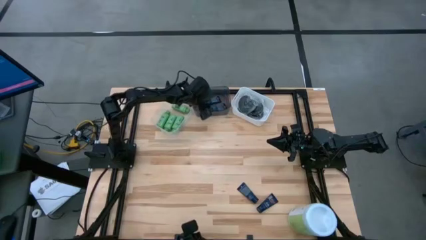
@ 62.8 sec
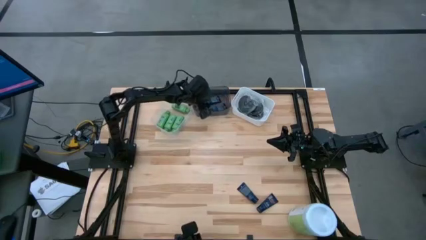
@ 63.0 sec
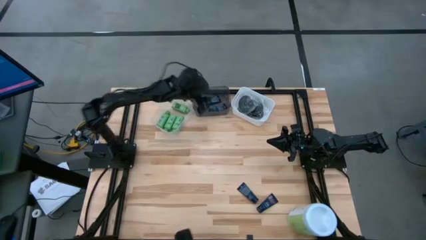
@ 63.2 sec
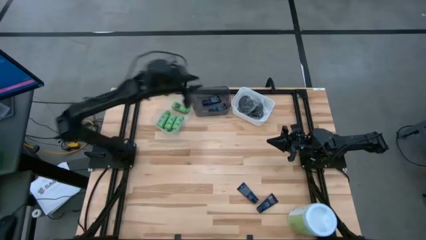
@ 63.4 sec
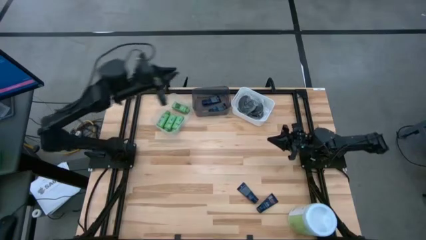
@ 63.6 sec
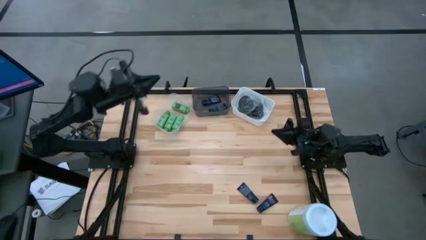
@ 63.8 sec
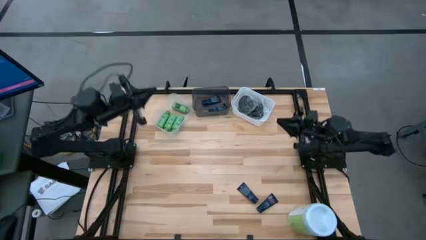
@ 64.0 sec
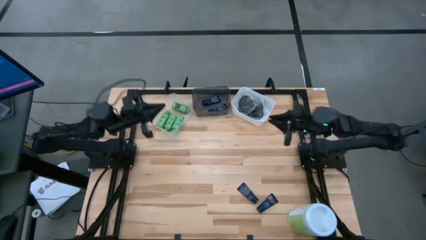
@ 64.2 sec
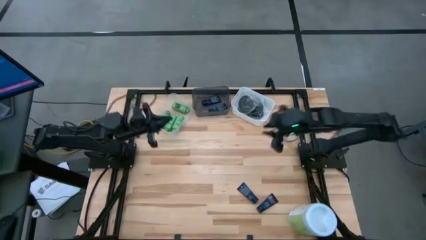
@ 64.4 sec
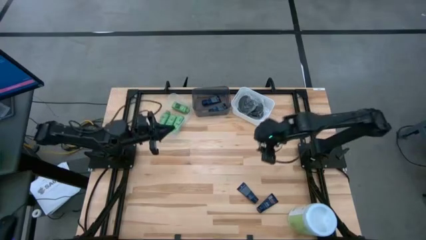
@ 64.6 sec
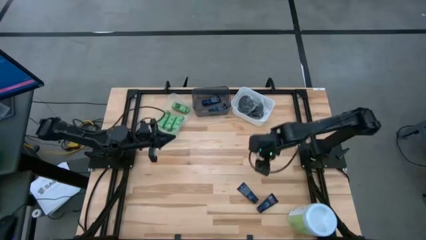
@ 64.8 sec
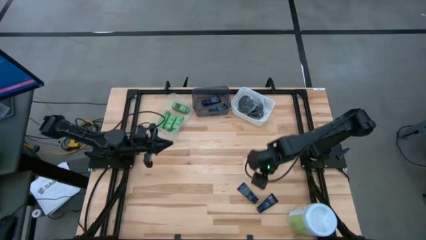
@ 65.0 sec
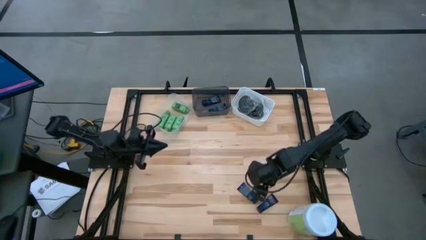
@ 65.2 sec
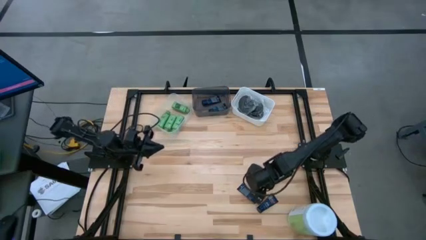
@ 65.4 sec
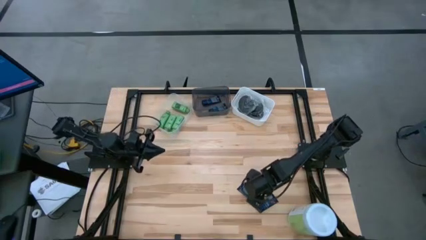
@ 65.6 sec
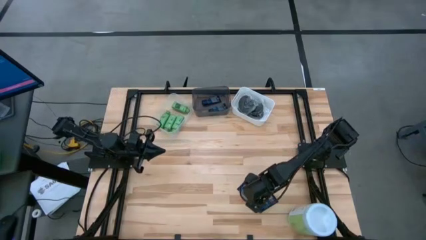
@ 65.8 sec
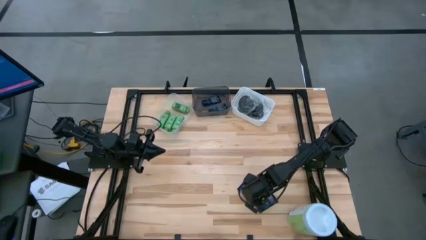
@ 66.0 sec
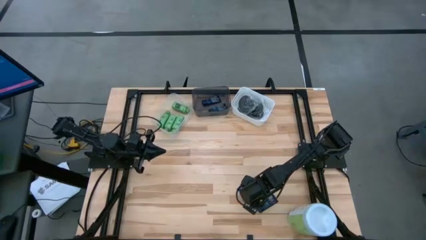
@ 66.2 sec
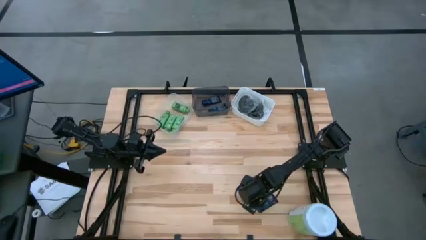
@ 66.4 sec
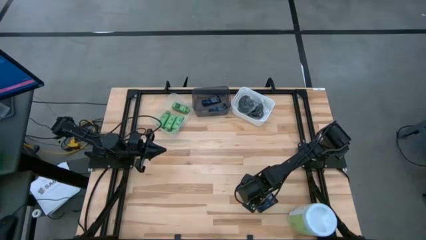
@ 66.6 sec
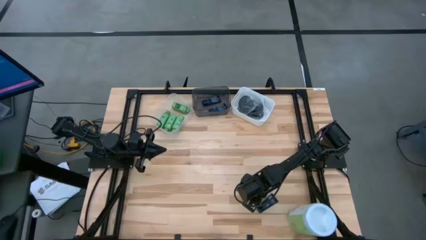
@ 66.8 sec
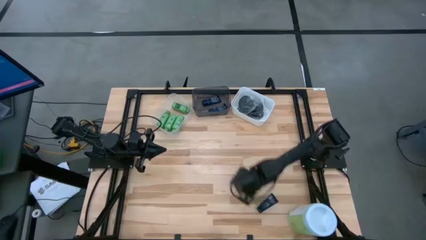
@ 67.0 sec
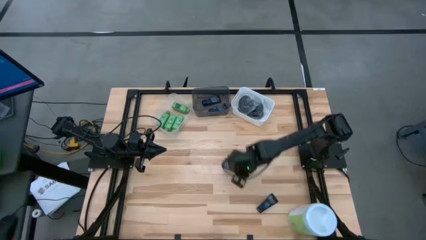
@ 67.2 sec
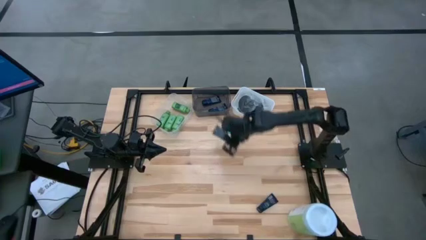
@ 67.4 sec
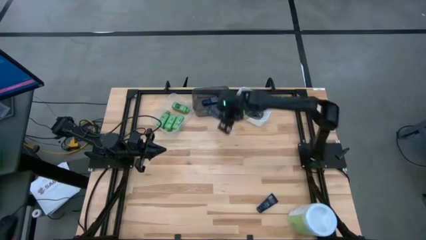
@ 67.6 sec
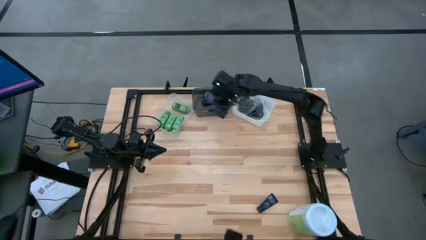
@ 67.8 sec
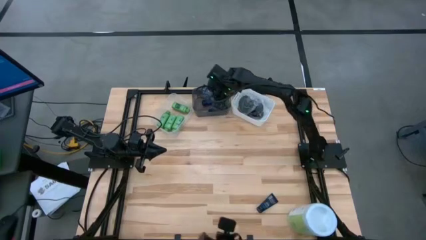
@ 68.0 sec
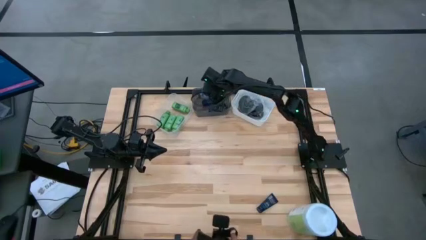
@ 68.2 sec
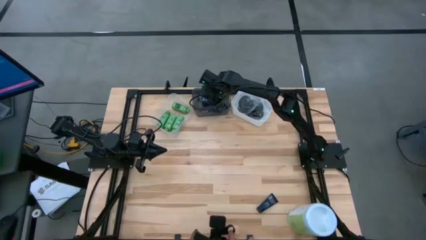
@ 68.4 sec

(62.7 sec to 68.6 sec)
Task: Pick & Place Travel size toiletries
Put the blue shave cream into the black bin

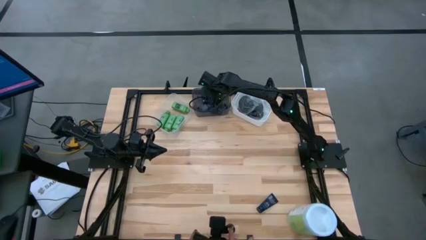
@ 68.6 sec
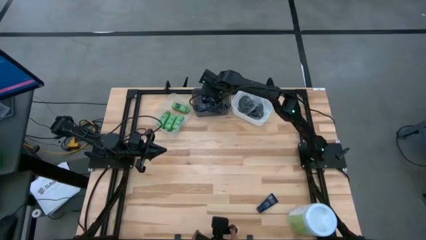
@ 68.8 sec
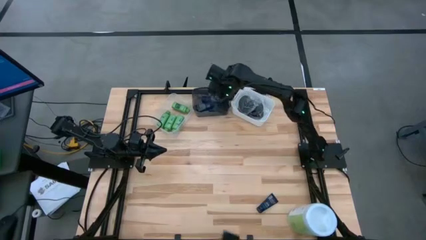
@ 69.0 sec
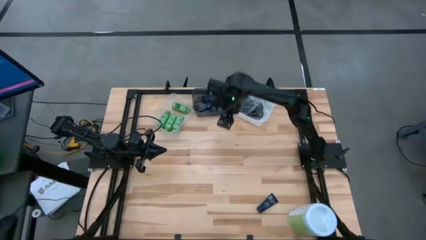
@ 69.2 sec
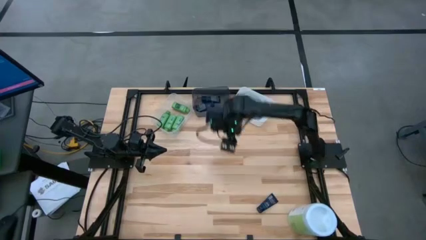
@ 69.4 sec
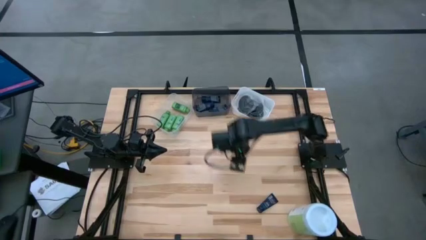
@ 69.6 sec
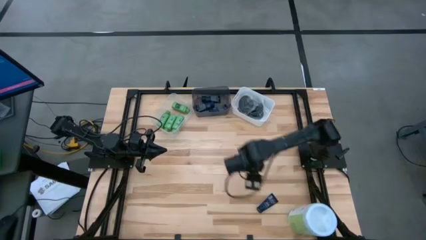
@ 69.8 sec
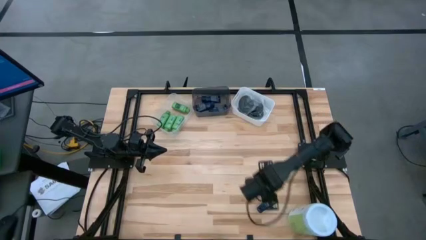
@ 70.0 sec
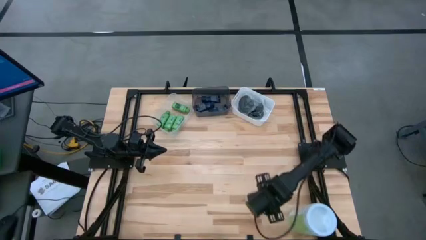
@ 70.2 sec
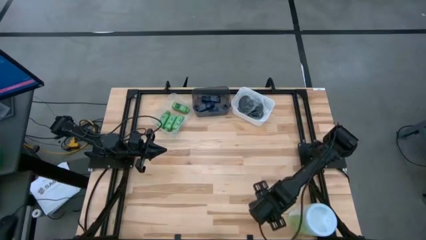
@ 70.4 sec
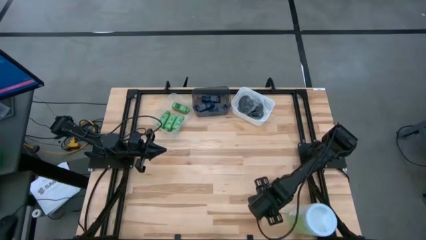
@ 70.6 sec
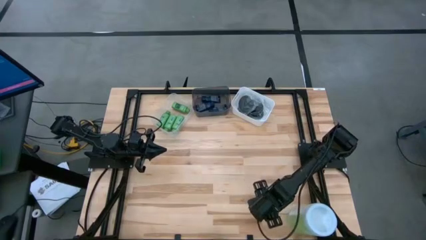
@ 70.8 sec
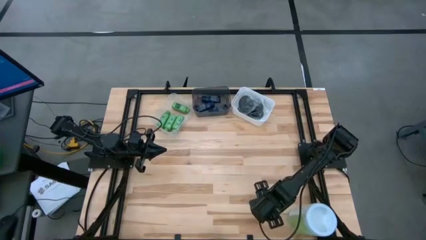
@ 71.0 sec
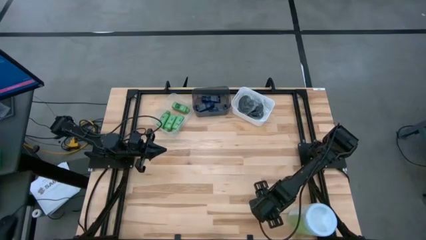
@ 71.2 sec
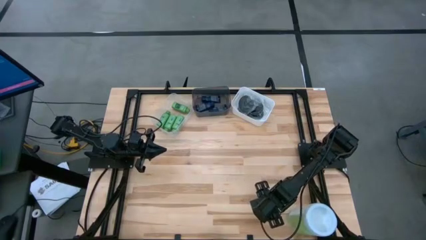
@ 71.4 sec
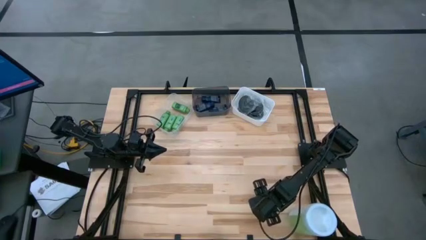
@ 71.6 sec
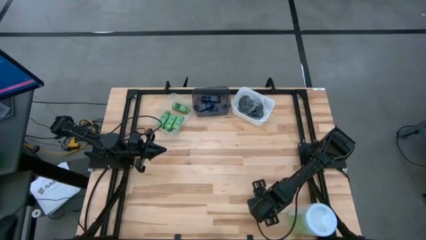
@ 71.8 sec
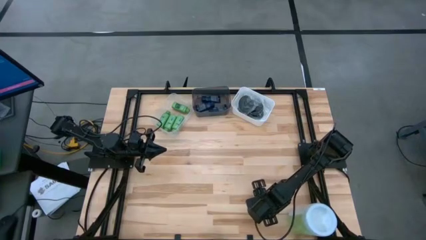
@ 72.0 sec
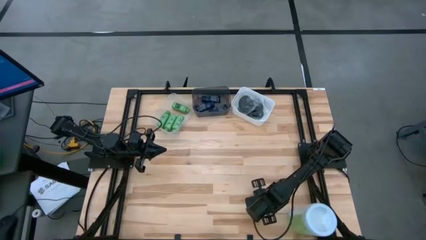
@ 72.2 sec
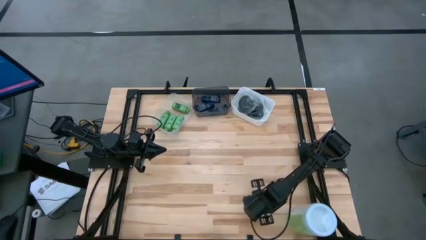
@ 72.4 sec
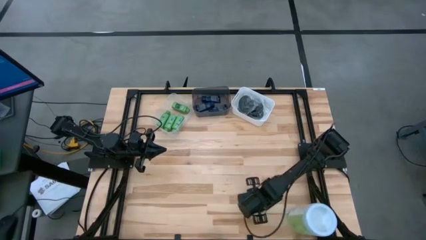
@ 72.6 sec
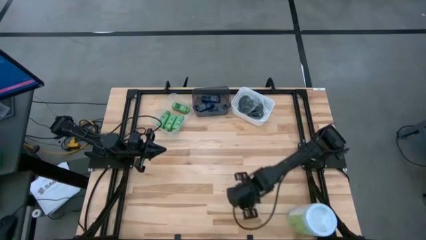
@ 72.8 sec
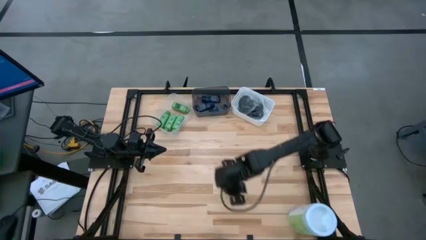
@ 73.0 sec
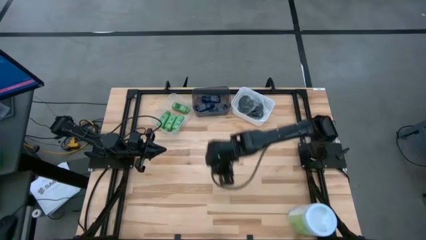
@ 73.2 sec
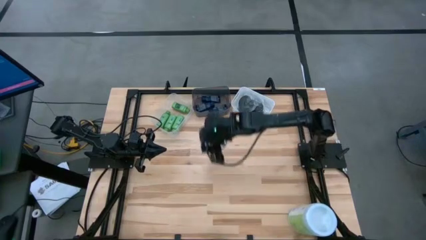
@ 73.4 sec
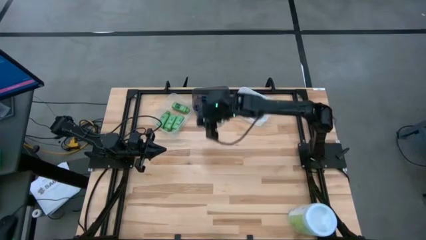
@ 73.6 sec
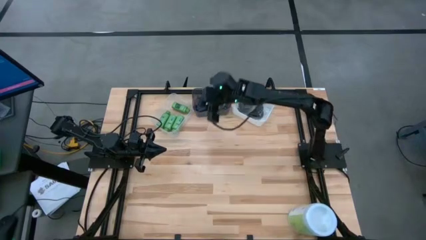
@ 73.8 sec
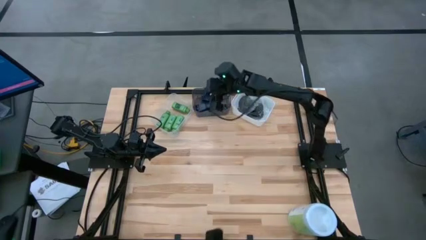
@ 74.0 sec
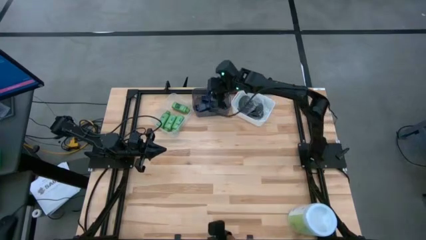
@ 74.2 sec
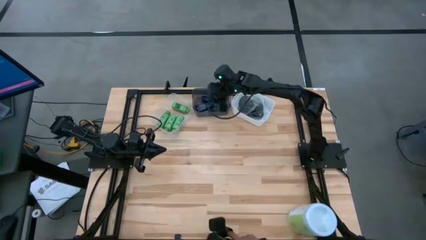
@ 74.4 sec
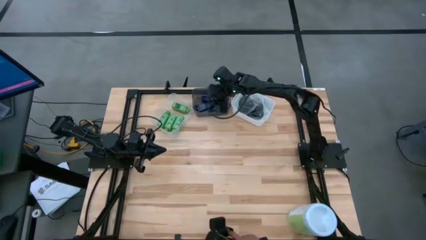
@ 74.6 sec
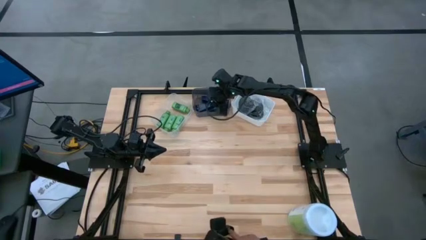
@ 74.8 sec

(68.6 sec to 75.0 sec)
Put the blue shave cream into the black bin

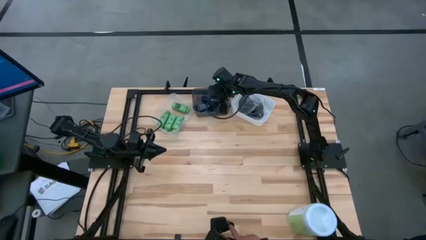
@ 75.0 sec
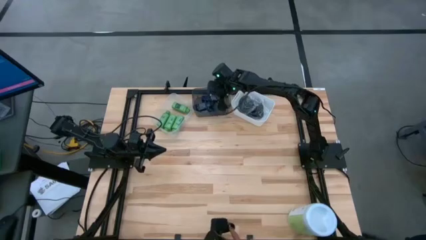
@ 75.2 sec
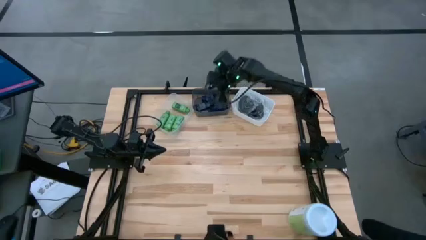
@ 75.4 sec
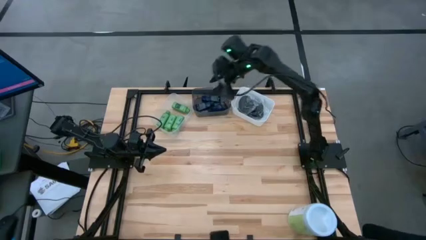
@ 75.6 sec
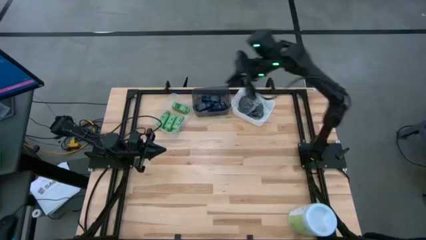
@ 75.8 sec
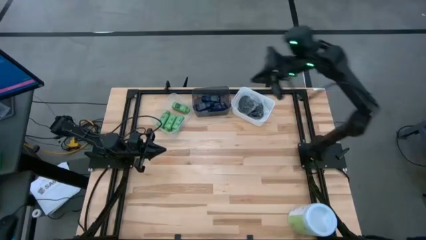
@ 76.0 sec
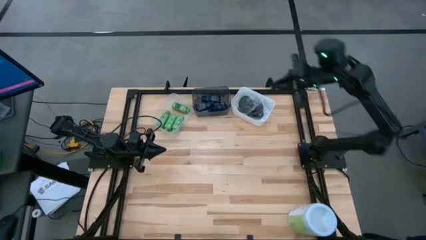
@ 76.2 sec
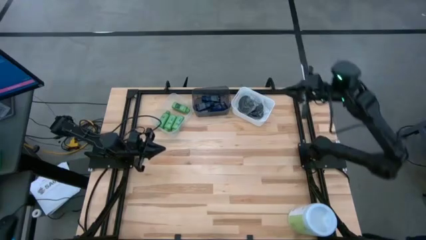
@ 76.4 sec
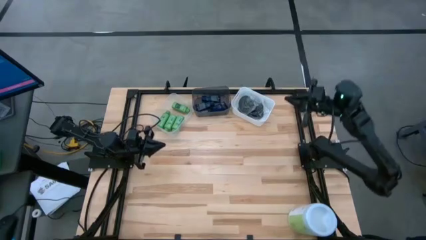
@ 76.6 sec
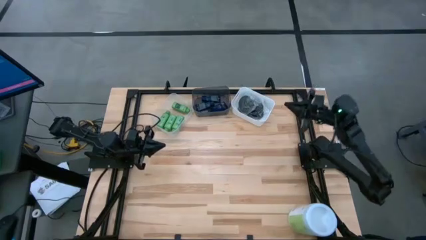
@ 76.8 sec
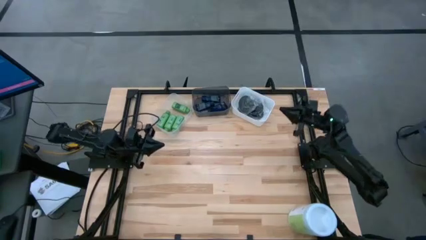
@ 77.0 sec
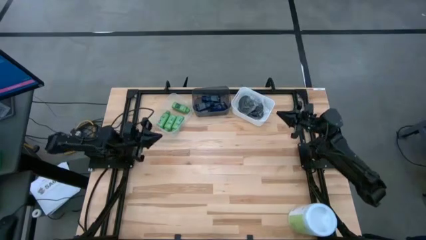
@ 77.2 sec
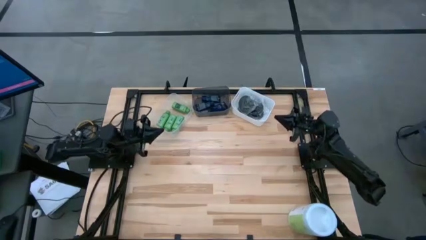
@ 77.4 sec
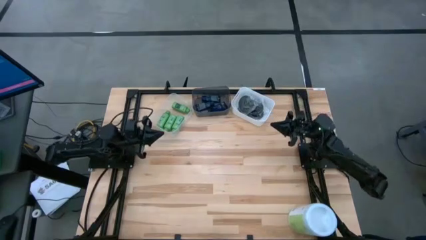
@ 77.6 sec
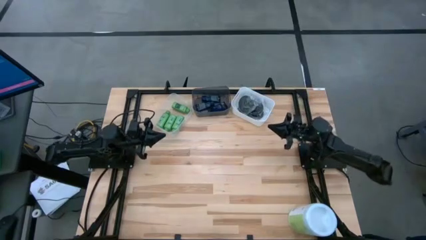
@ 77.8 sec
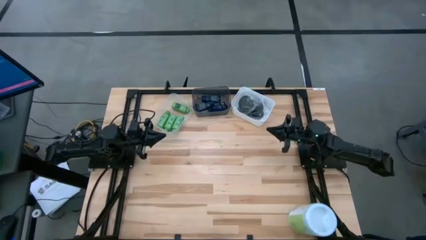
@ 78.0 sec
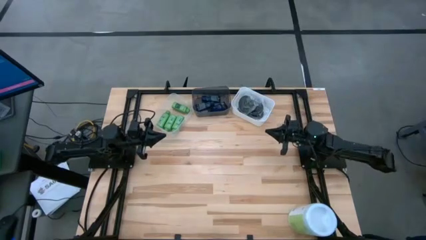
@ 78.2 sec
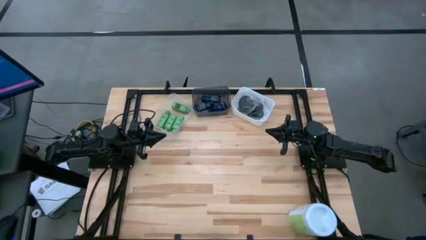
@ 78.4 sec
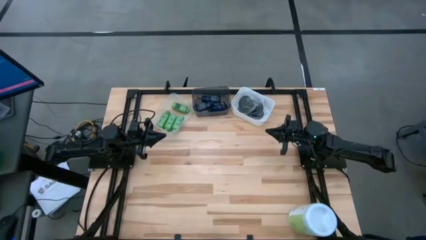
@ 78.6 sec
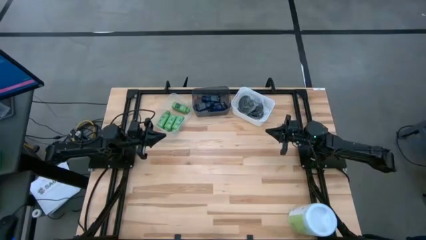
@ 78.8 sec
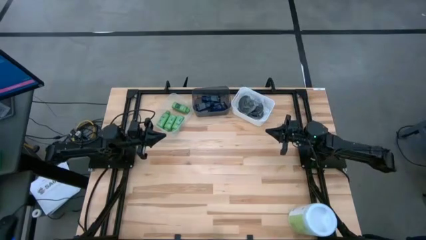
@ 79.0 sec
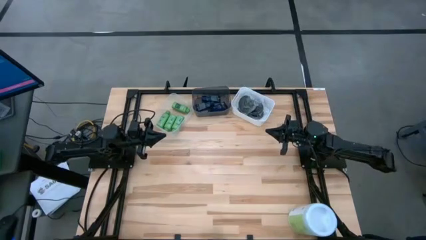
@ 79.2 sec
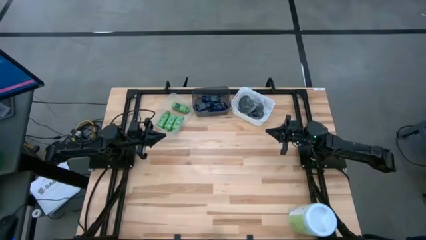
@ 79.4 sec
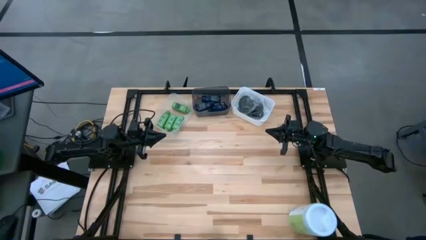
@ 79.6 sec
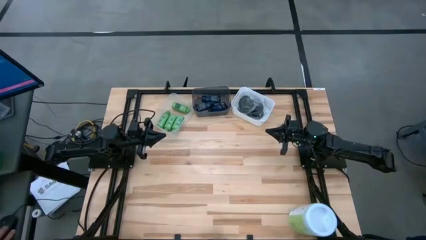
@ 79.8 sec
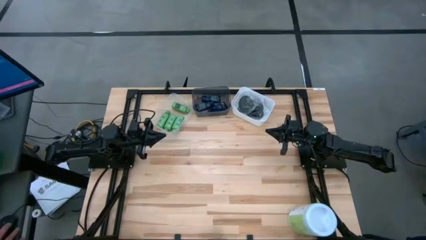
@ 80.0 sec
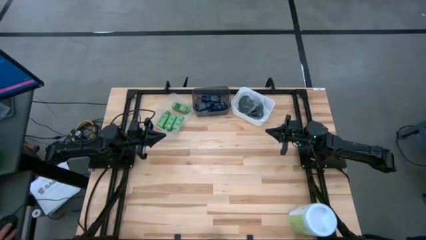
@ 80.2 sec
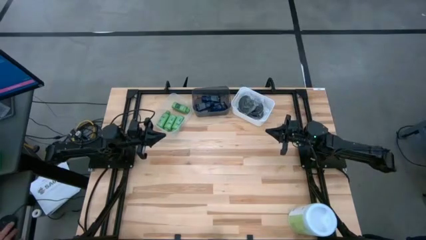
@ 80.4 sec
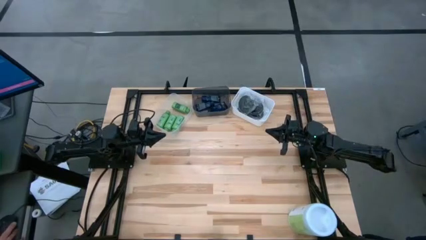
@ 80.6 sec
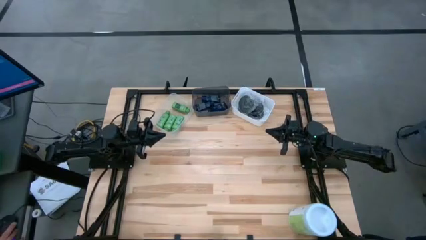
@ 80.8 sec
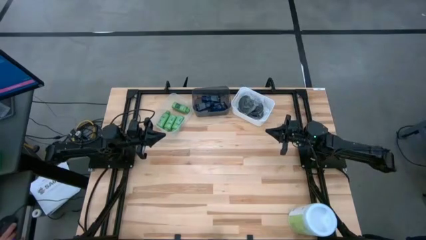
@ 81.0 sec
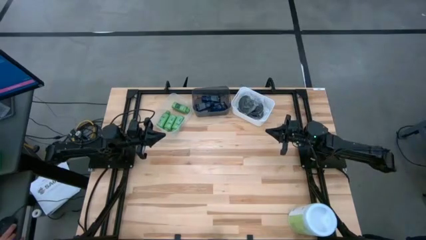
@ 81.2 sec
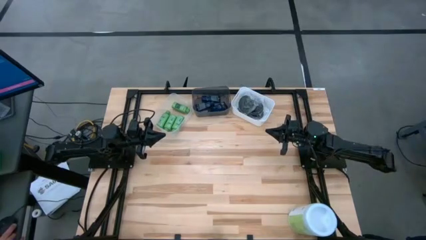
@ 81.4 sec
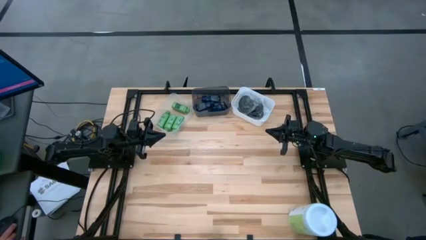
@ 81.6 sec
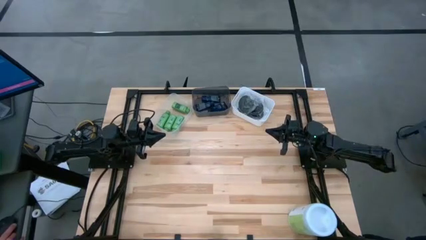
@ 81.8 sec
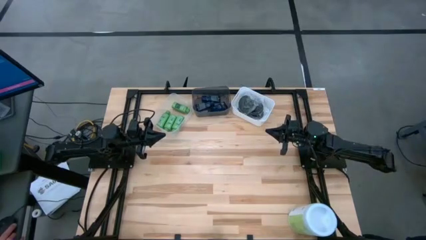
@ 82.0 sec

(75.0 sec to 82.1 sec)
Return to Home Position
